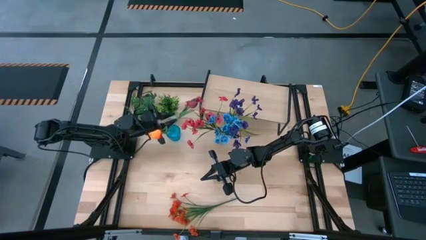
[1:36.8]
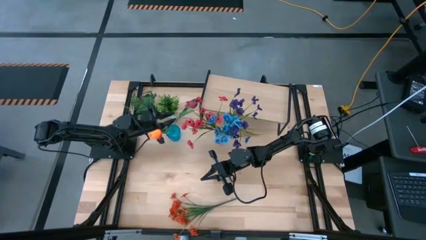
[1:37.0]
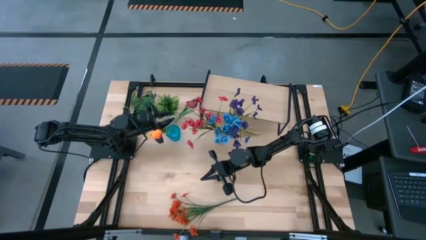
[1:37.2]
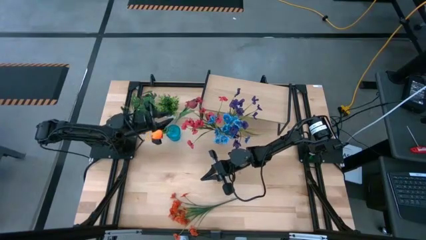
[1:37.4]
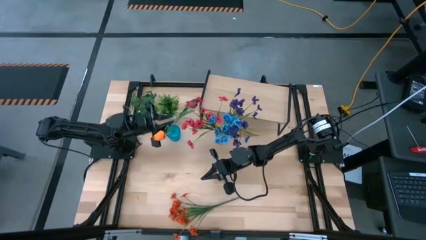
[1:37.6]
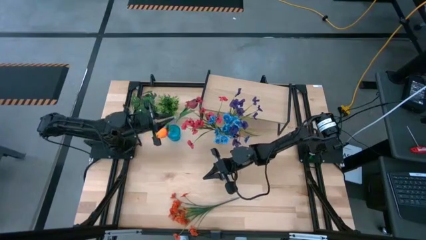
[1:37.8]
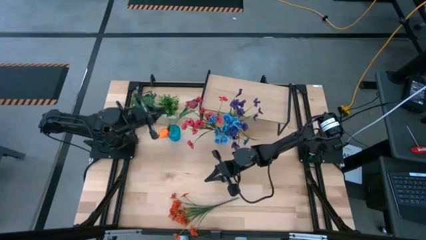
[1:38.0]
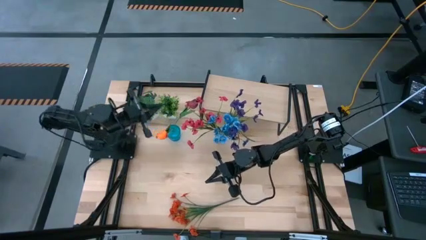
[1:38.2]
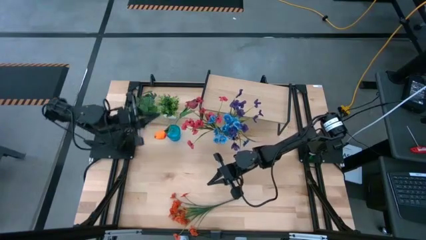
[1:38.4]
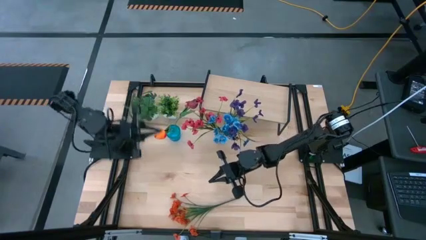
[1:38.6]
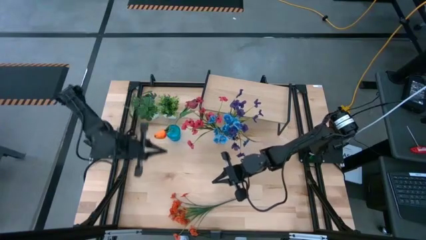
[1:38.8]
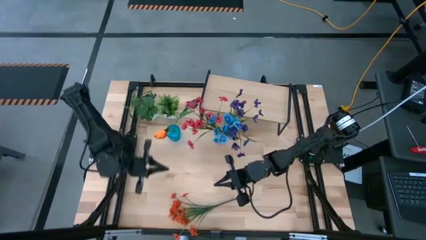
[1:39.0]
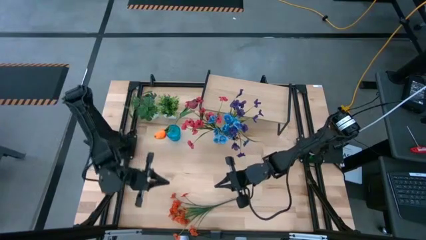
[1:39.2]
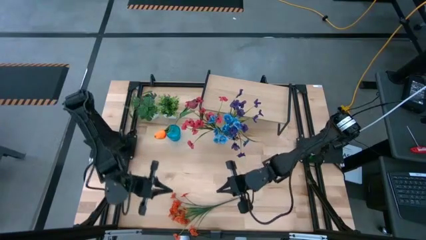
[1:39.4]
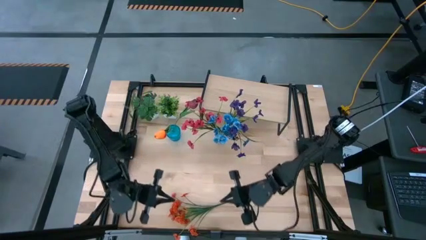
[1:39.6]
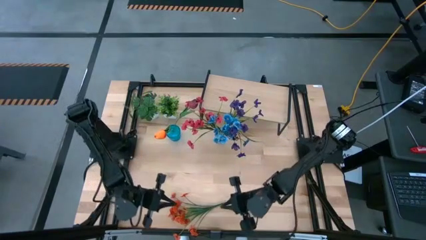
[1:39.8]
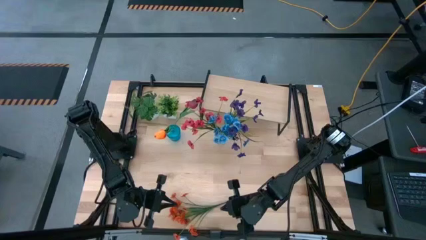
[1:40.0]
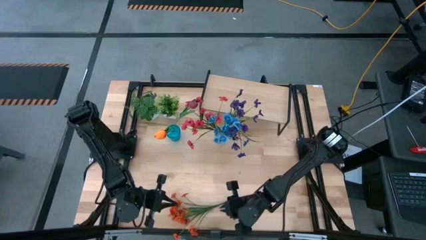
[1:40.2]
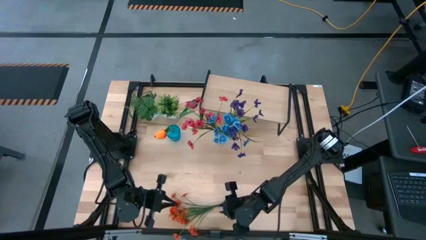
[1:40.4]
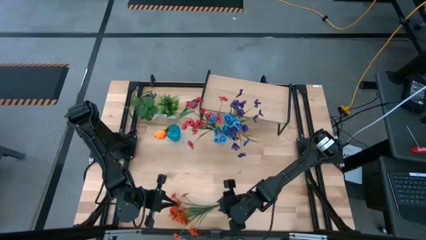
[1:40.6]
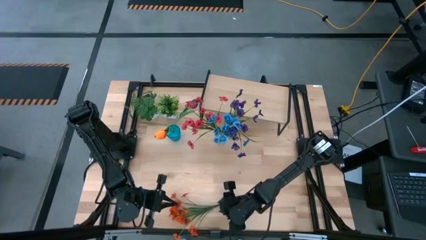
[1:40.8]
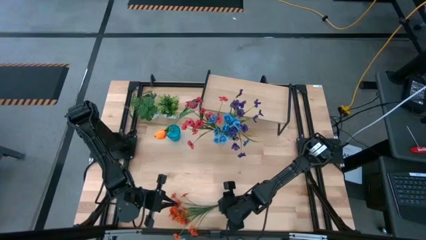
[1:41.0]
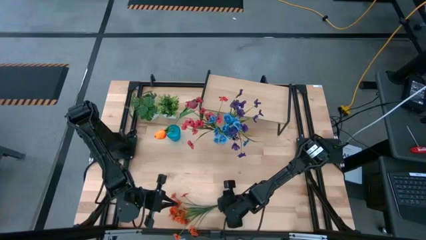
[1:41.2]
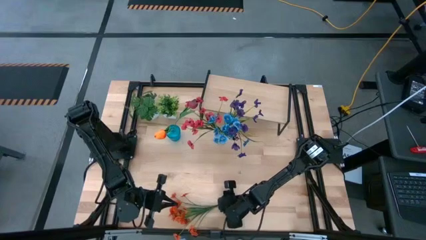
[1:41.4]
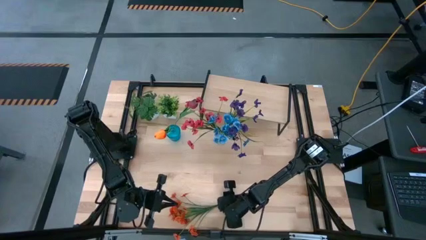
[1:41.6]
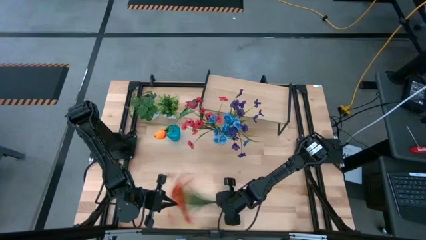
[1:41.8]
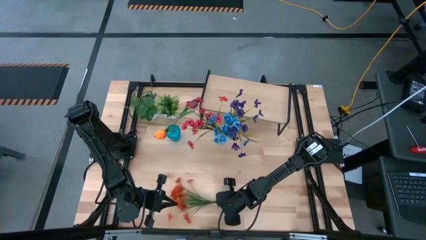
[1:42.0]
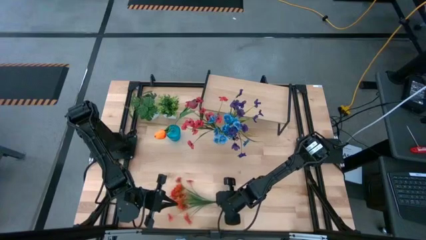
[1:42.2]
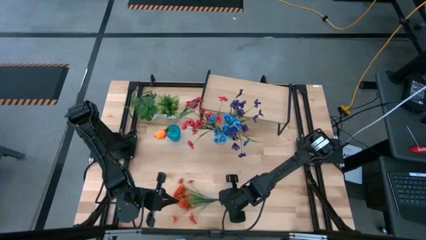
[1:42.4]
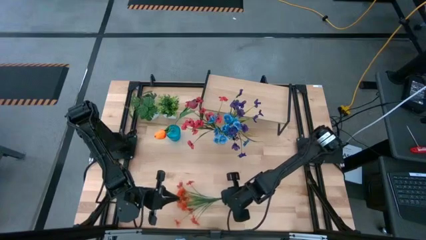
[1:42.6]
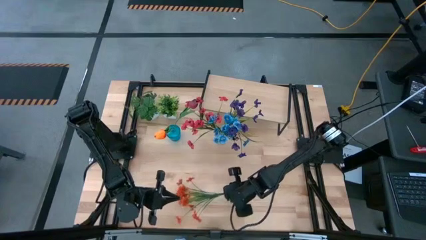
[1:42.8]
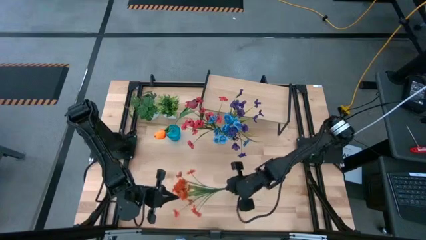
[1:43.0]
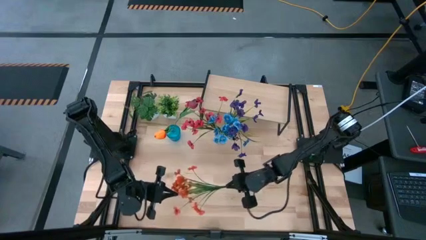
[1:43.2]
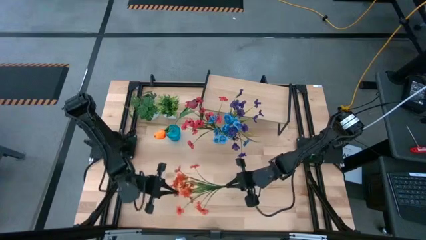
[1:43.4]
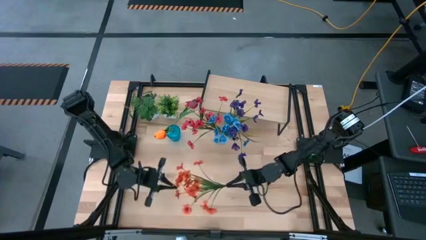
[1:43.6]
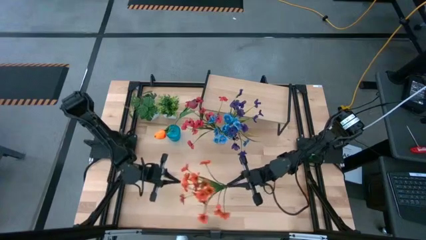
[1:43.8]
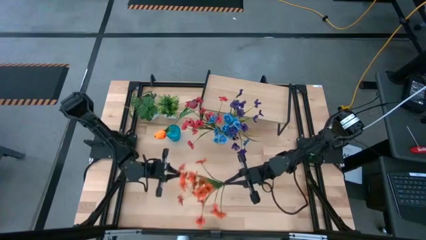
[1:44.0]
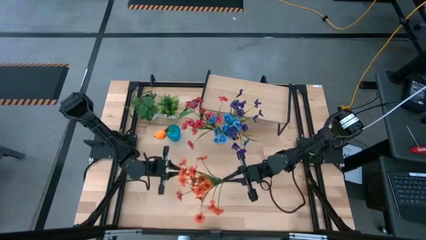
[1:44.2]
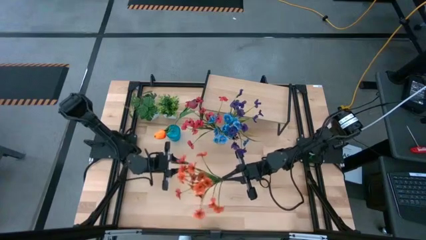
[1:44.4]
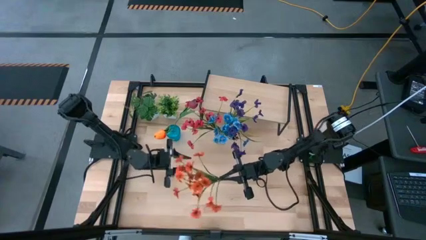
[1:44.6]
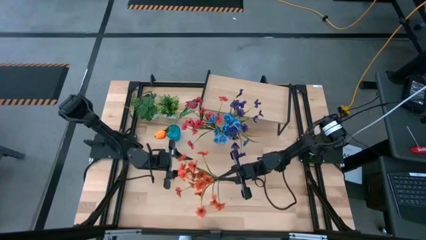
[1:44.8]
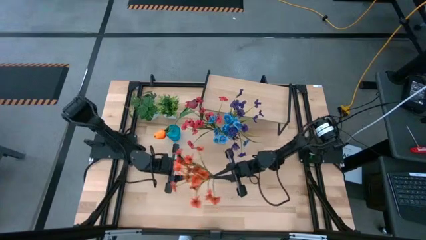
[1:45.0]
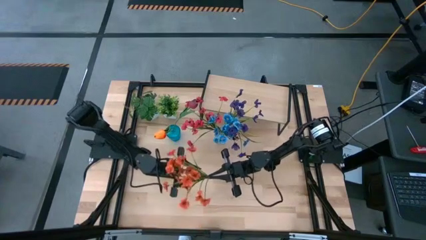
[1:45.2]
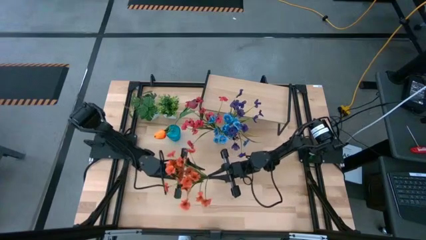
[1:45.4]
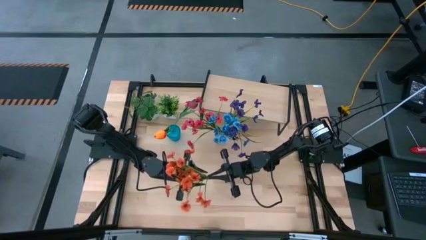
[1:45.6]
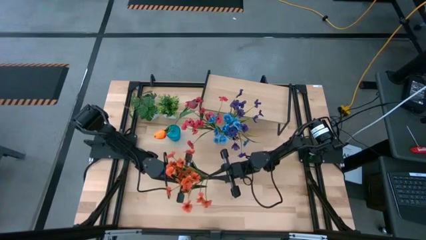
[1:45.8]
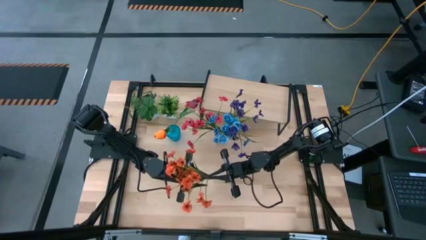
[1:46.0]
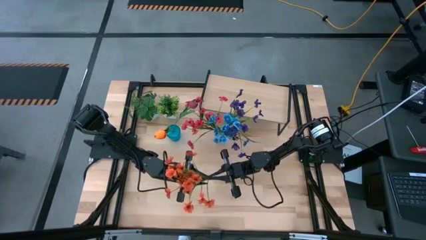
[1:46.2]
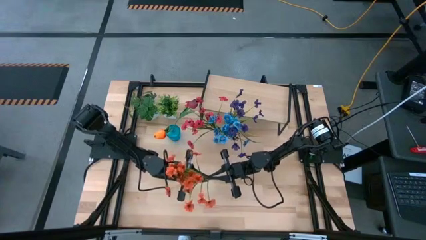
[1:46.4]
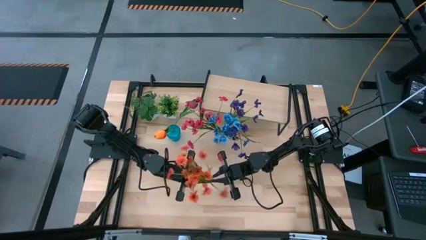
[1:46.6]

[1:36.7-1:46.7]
Task: Pick and place flowers into a vace then onto a shelf
Put the orange flowers into the blue vase
